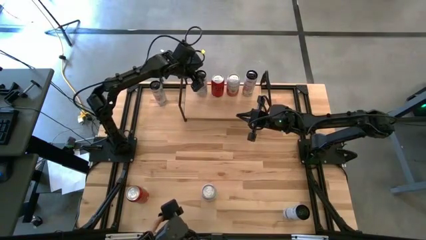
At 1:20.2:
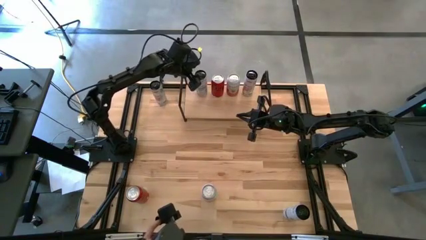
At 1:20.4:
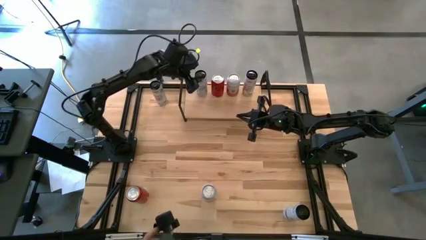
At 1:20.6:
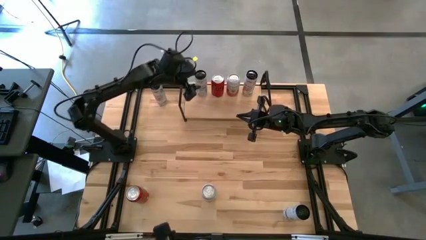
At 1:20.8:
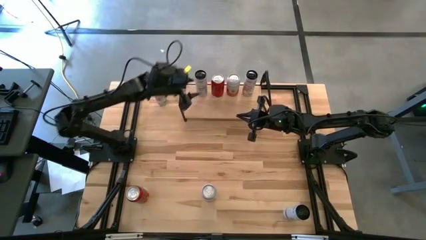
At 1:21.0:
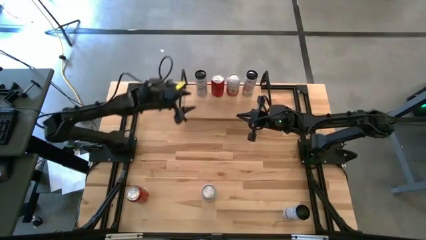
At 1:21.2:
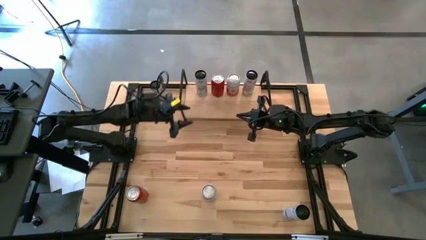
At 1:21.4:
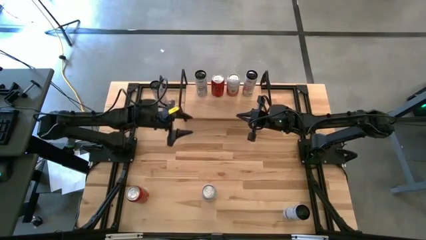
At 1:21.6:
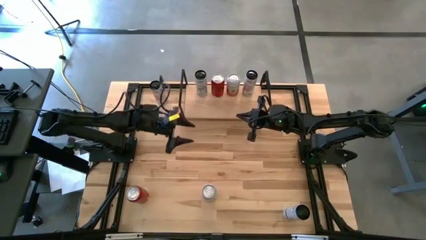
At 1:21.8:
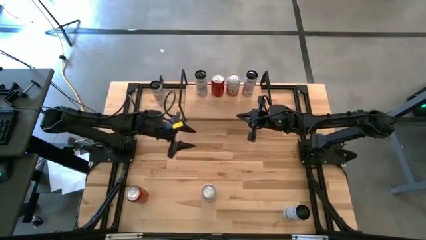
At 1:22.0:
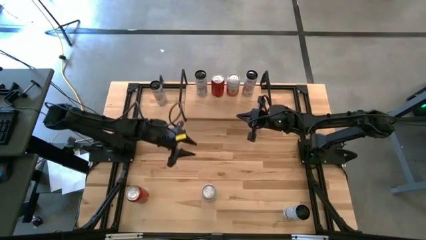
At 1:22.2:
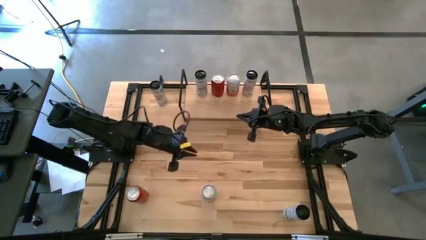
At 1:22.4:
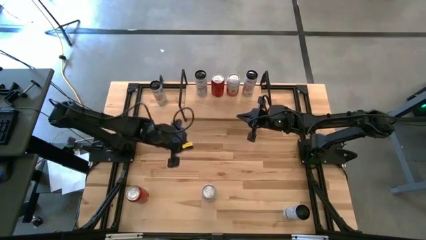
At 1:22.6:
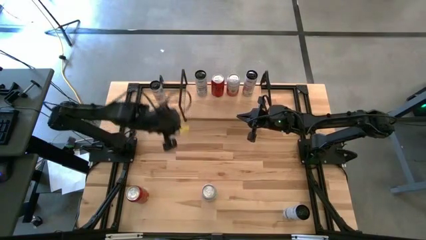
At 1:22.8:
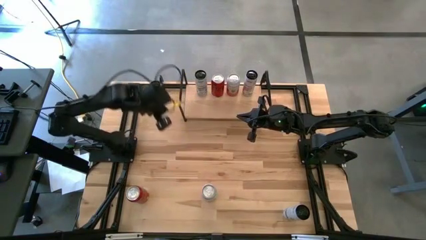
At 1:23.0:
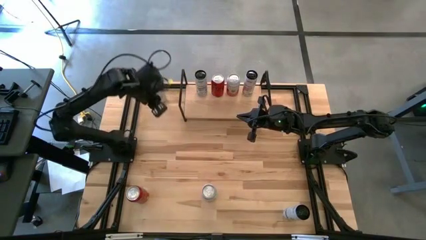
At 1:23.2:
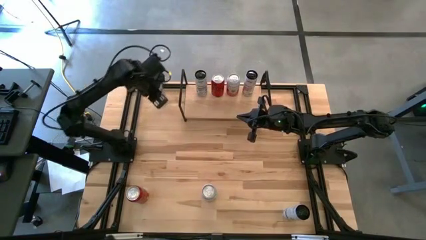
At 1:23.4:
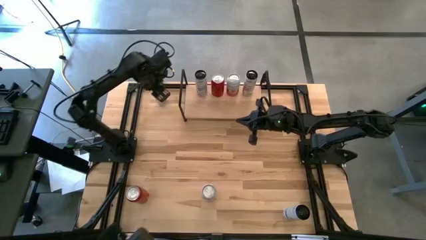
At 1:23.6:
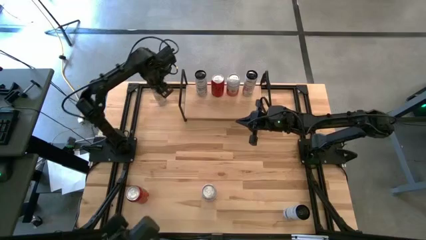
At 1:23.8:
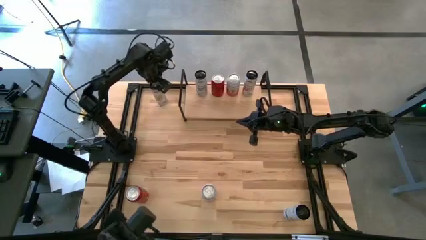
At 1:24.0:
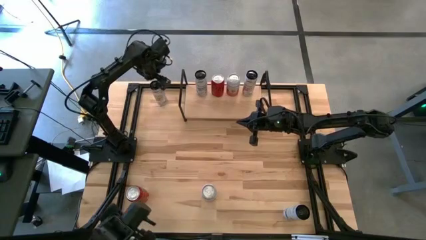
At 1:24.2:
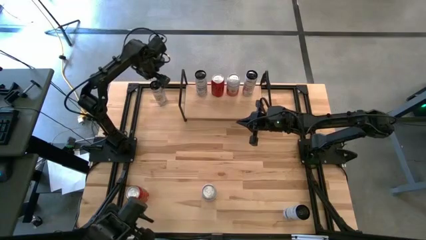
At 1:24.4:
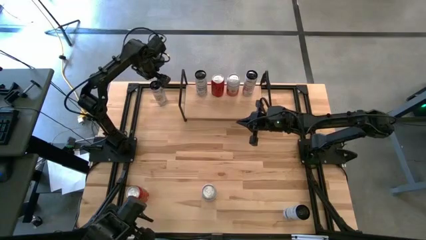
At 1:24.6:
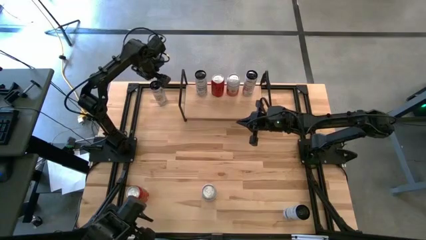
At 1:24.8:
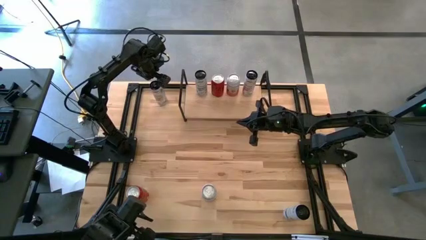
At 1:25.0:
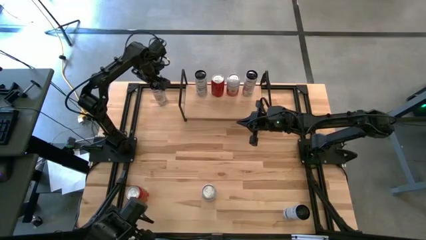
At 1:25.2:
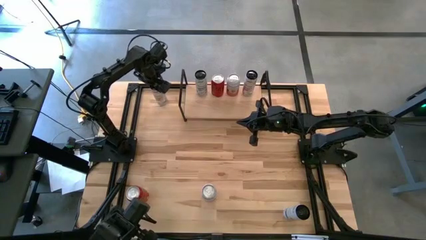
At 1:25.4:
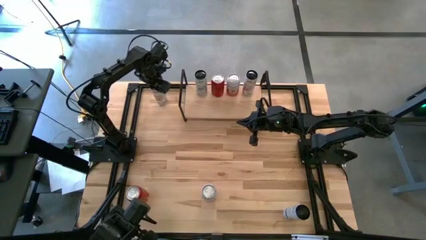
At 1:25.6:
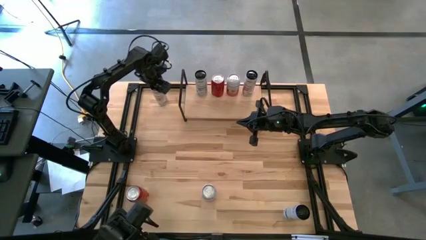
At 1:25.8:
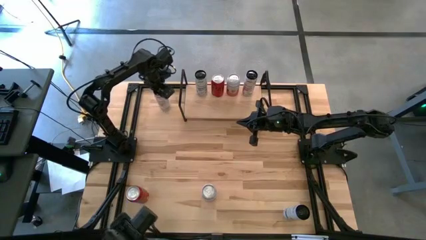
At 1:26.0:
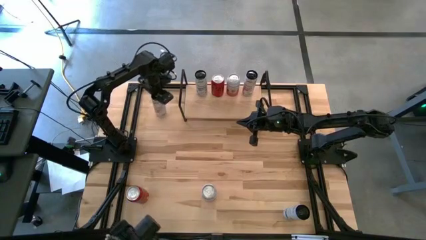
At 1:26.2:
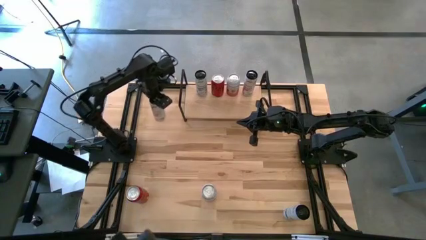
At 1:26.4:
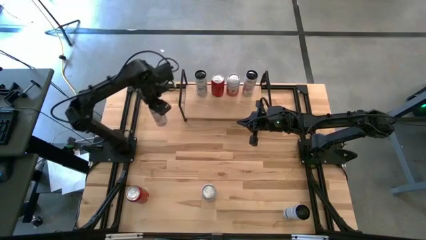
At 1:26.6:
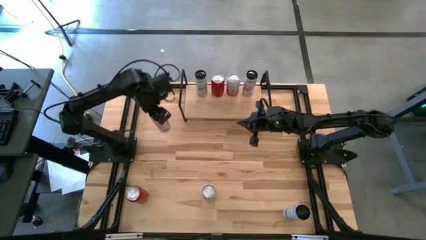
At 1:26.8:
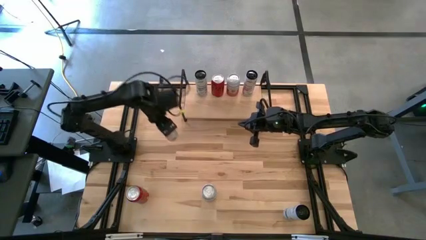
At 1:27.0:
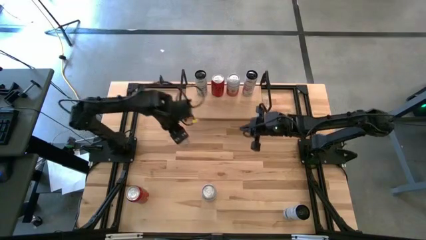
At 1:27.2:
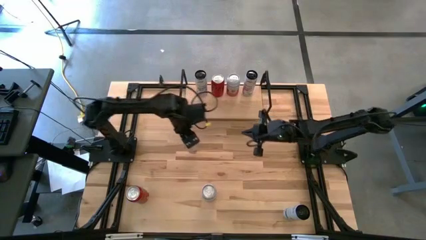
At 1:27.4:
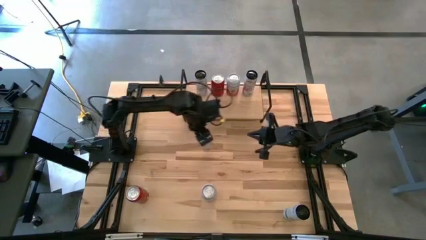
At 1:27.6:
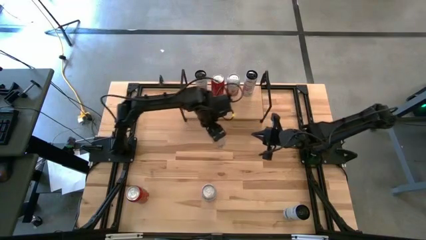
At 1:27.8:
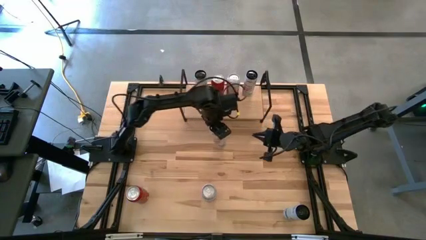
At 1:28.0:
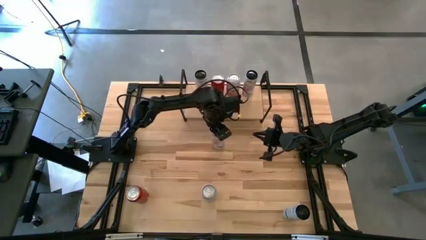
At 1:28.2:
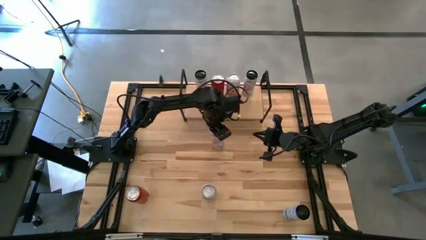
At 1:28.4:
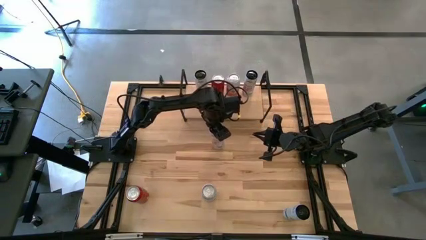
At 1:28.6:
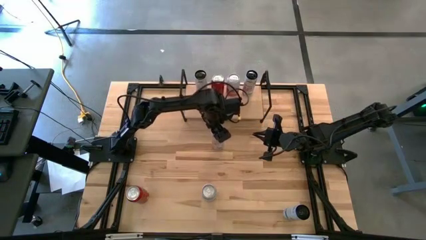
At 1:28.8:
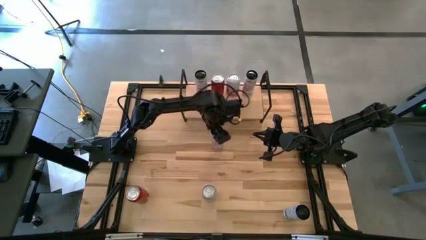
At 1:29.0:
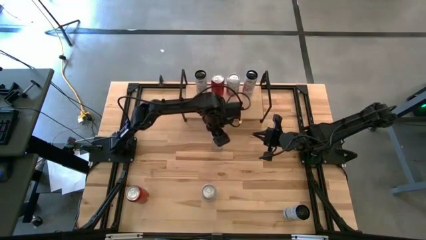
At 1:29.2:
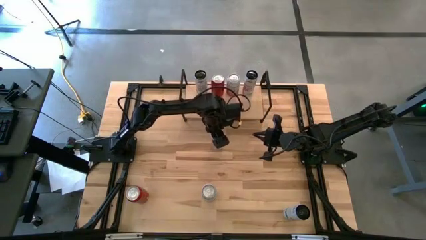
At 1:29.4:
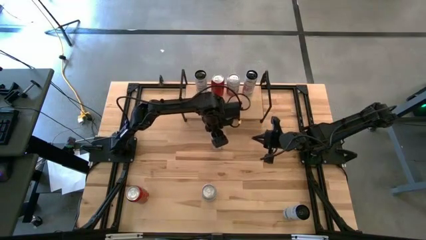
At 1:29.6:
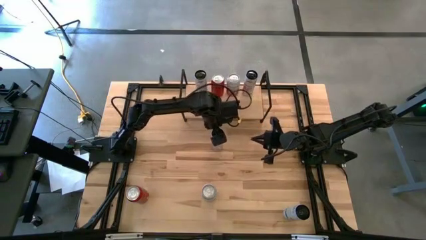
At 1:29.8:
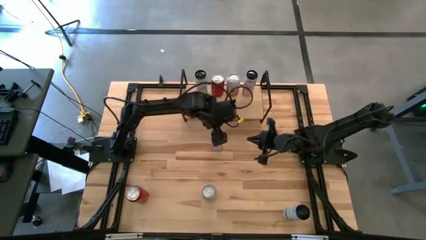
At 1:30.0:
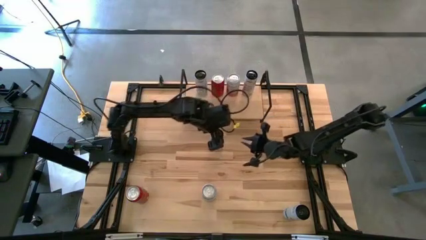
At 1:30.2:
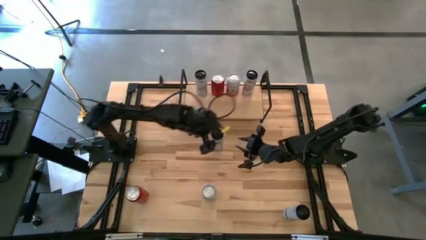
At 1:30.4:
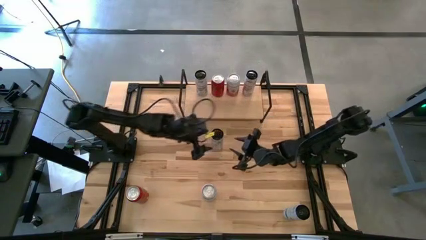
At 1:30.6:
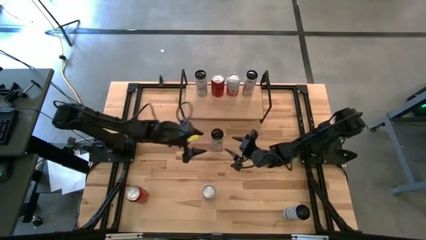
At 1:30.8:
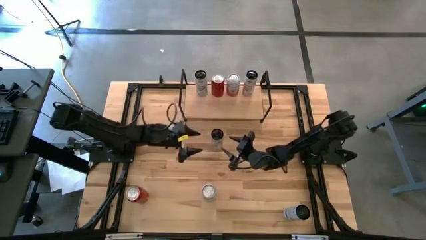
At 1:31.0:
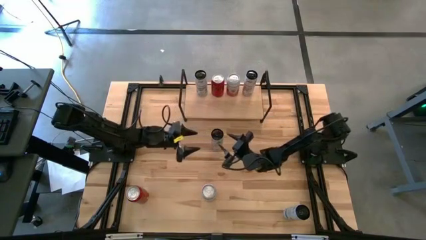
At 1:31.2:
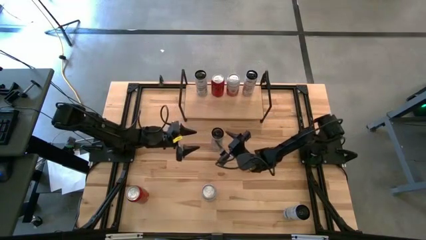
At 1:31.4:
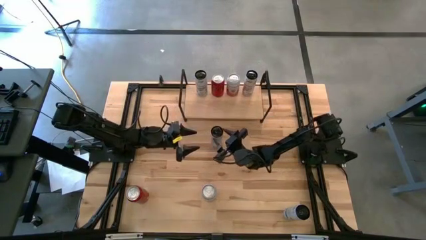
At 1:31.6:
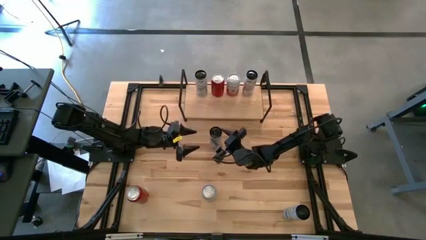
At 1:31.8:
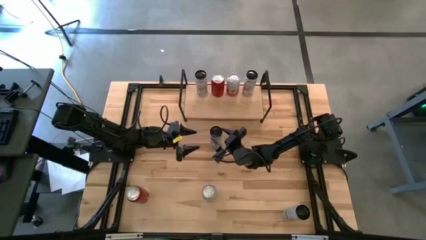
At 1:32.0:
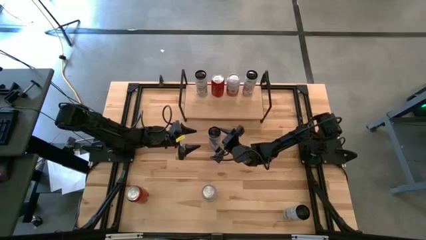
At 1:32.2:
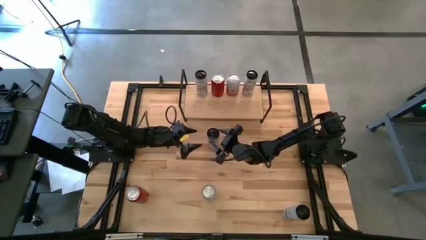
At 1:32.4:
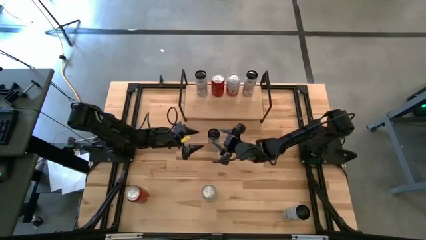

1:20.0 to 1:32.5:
Task: Place canned beverage on shelf
Put the white and red soda can on the shelf aligned with the other white and red soda can

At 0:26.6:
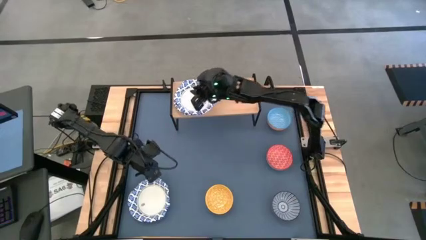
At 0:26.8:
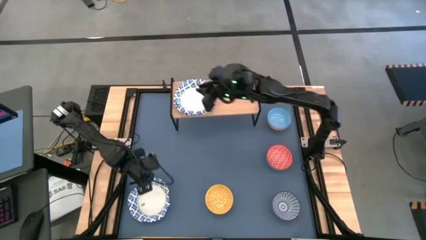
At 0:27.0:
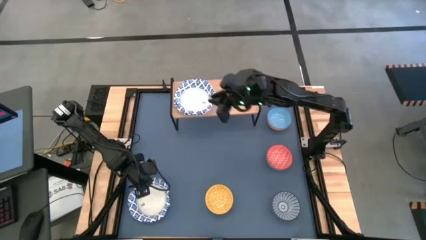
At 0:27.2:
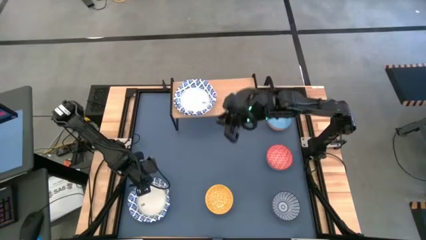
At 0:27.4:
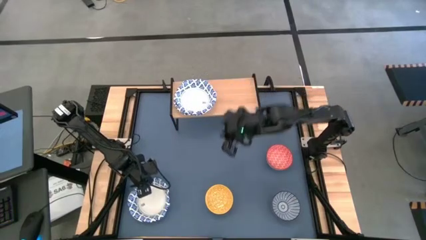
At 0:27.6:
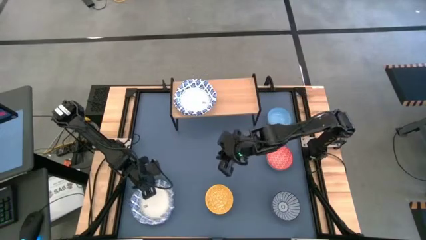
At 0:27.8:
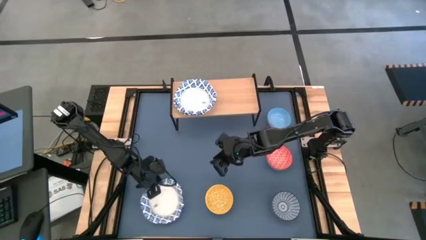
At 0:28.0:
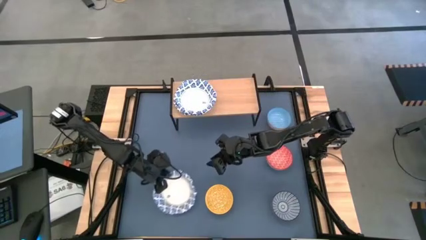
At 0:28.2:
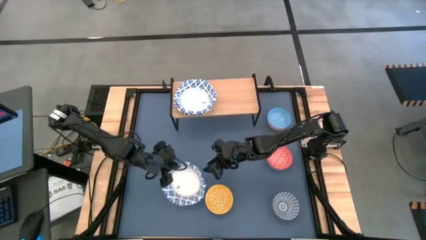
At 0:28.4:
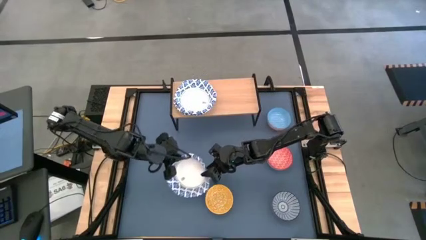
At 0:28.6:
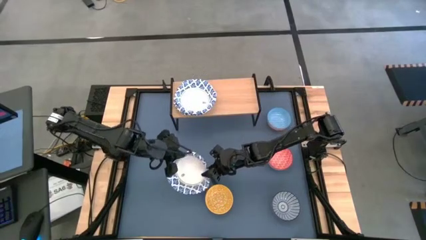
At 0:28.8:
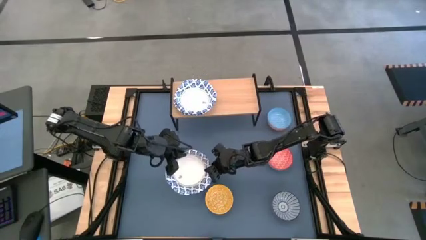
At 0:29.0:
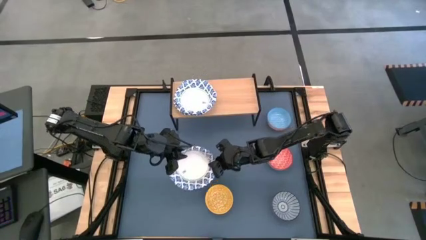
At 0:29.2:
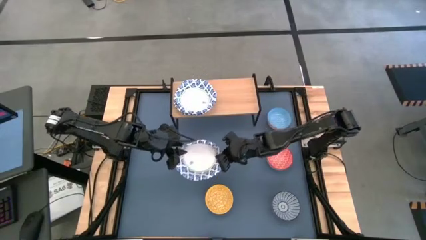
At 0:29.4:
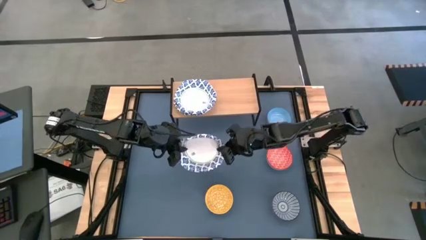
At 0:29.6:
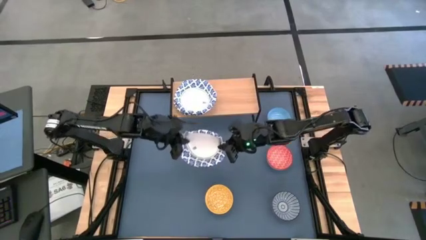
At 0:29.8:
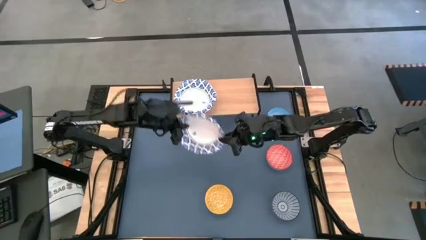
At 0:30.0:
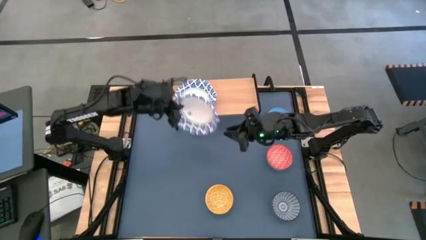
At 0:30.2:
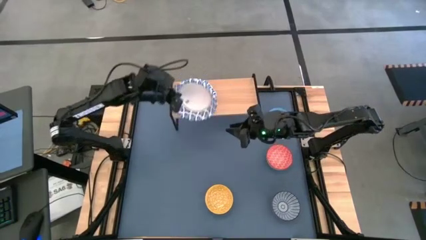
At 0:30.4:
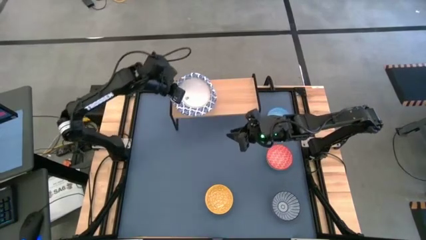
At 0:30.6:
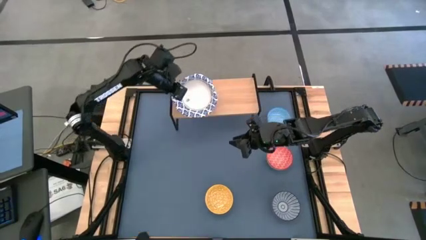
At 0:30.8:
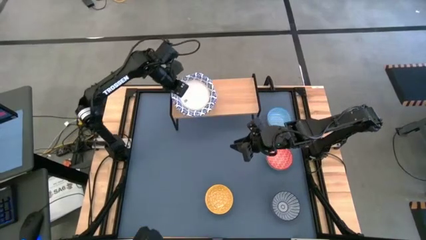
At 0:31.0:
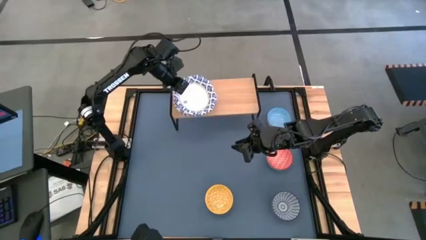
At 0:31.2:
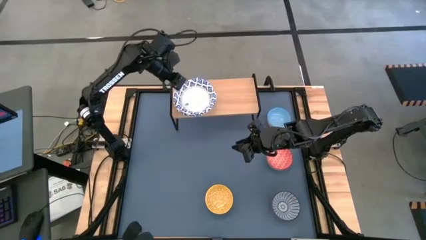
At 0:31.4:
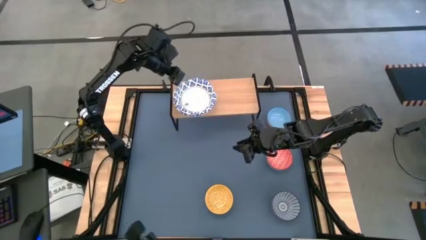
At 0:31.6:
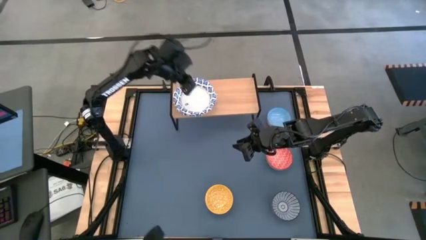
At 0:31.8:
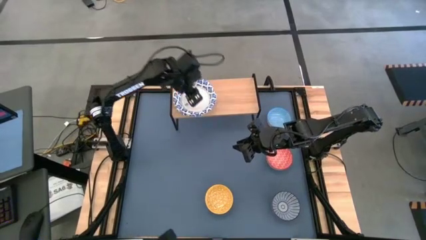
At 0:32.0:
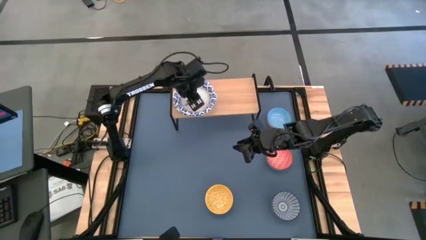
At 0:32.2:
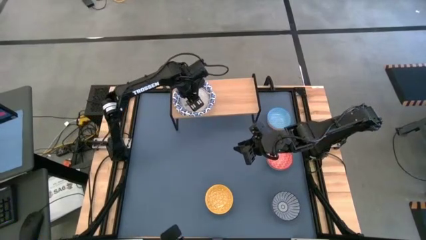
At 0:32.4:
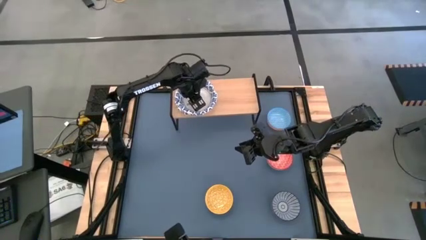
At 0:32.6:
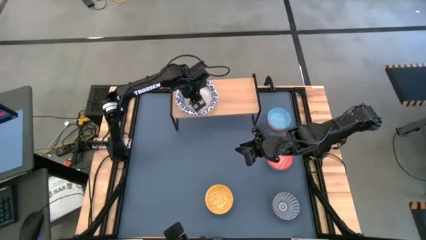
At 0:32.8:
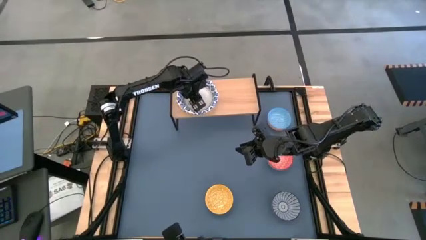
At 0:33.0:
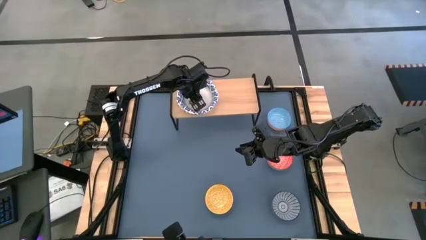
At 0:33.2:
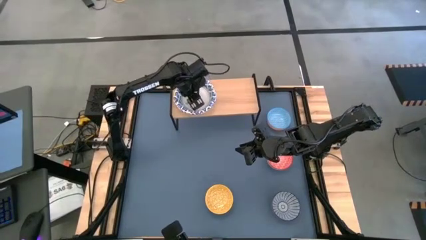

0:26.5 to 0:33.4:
Task: Place and stack bowls onto a shelf
Stack the white bowl on top of the white bowl on the shelf
